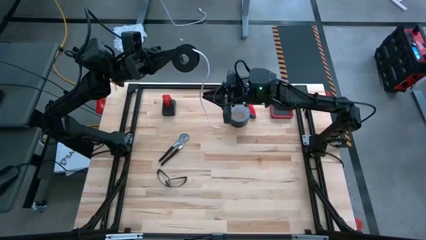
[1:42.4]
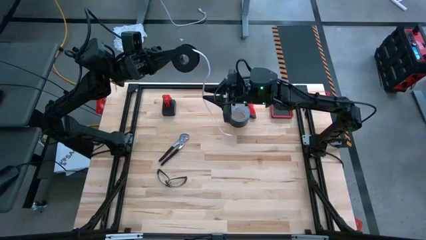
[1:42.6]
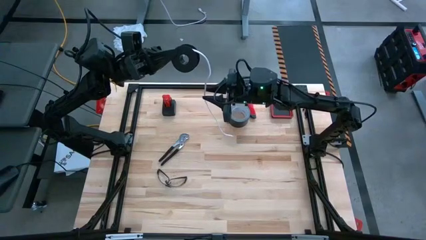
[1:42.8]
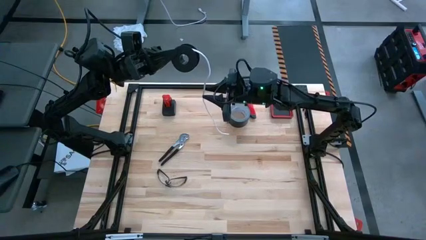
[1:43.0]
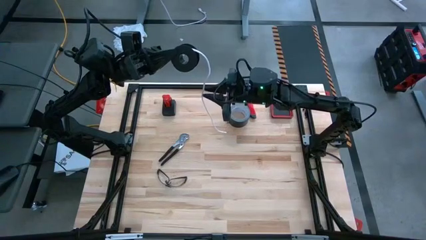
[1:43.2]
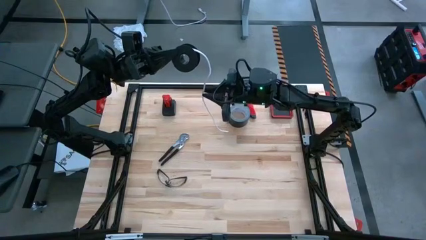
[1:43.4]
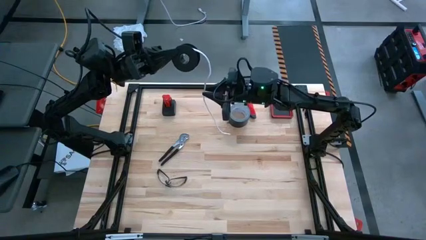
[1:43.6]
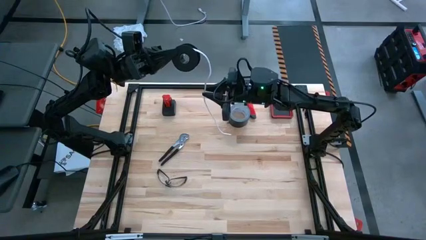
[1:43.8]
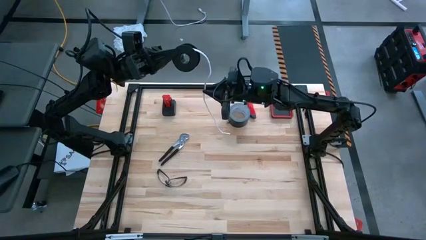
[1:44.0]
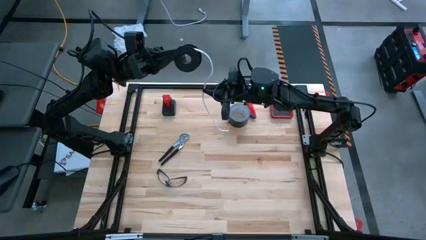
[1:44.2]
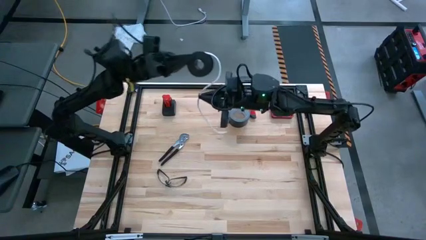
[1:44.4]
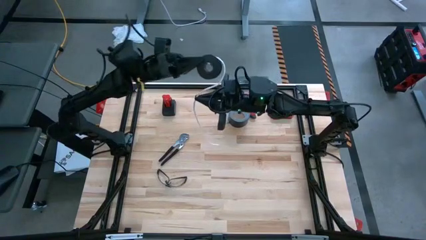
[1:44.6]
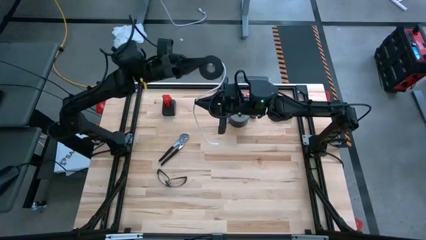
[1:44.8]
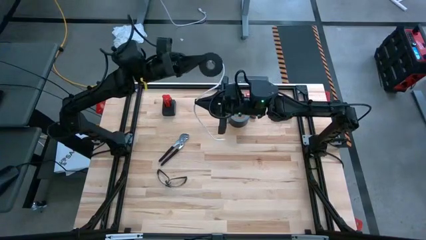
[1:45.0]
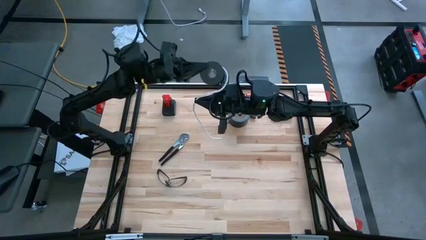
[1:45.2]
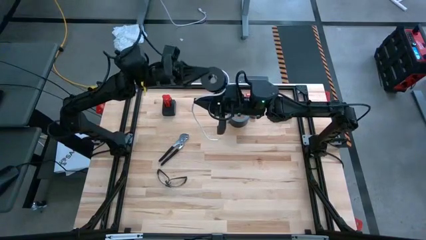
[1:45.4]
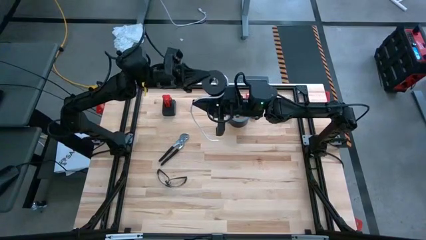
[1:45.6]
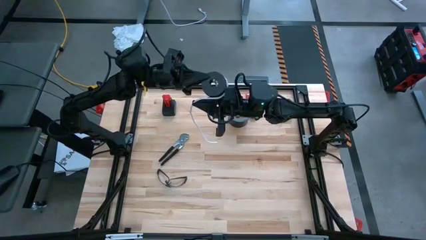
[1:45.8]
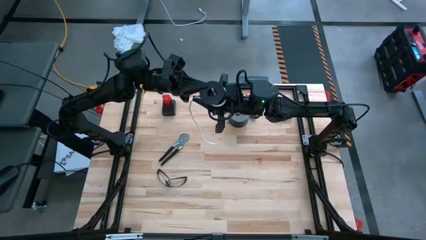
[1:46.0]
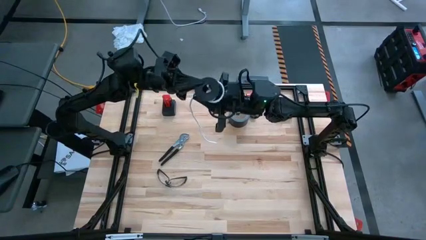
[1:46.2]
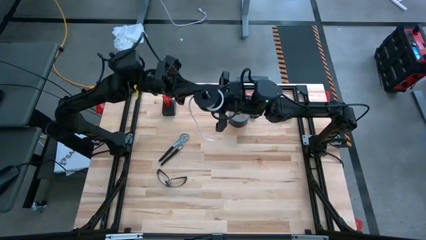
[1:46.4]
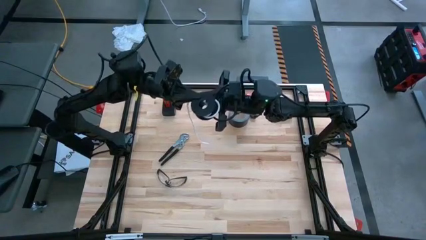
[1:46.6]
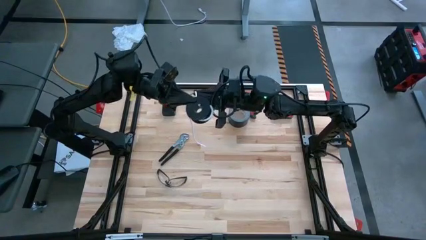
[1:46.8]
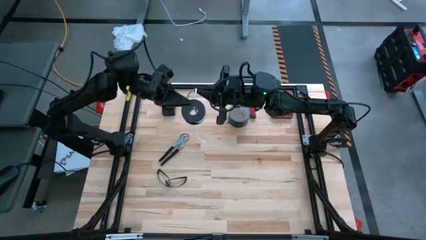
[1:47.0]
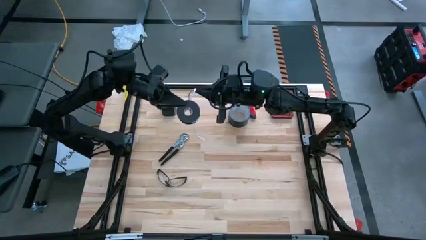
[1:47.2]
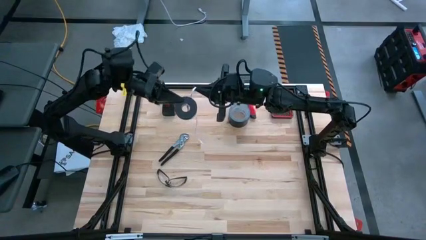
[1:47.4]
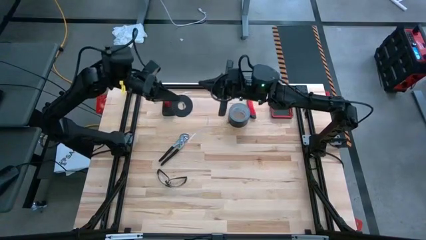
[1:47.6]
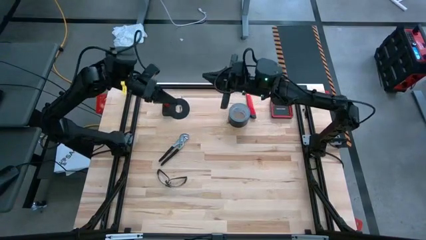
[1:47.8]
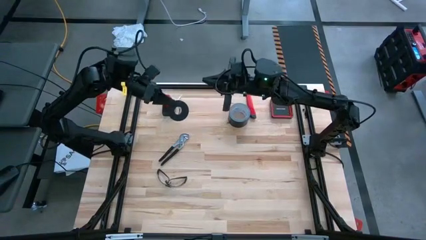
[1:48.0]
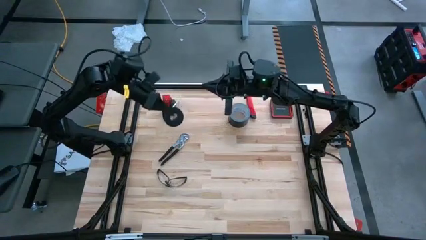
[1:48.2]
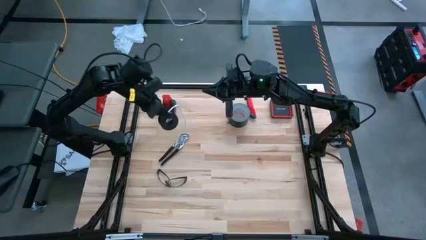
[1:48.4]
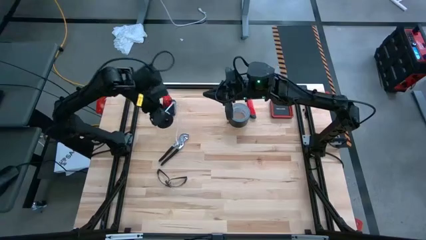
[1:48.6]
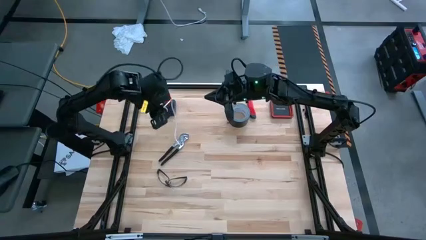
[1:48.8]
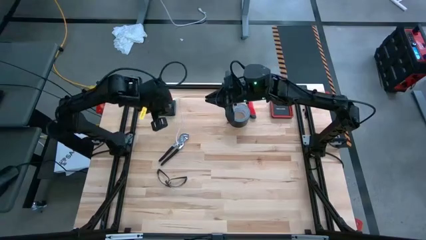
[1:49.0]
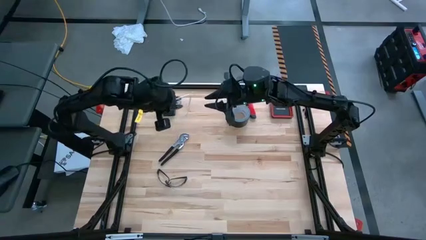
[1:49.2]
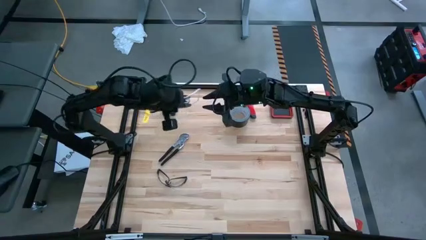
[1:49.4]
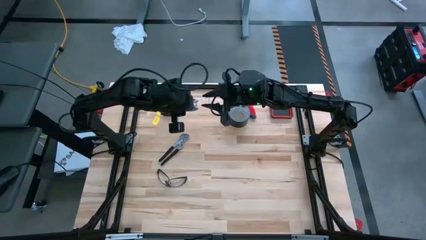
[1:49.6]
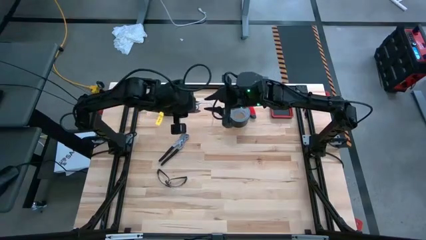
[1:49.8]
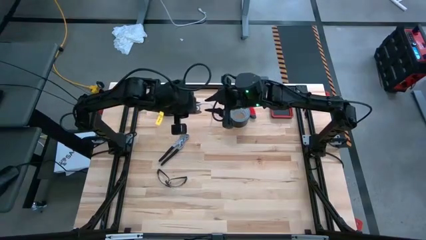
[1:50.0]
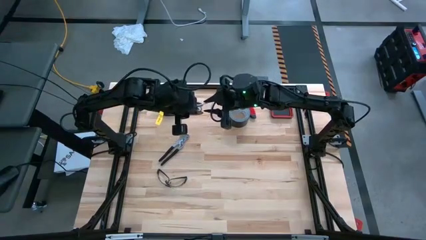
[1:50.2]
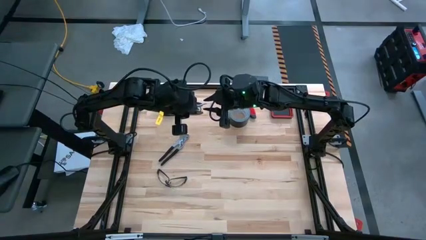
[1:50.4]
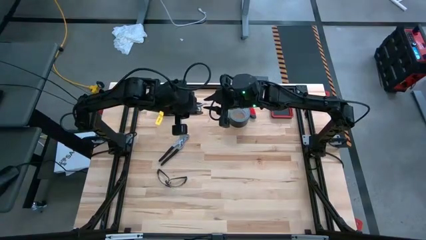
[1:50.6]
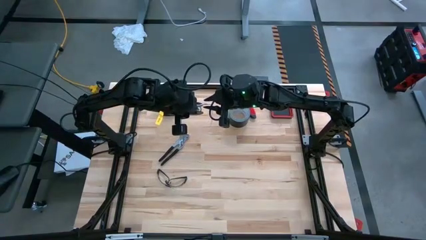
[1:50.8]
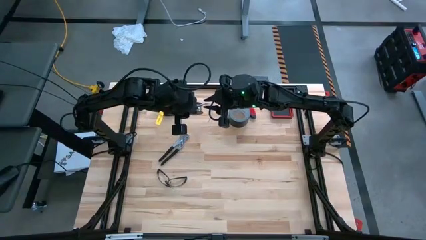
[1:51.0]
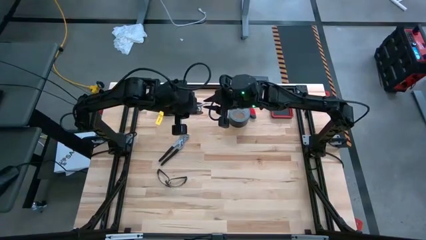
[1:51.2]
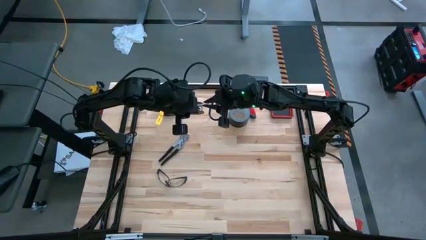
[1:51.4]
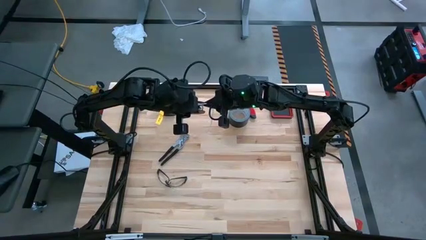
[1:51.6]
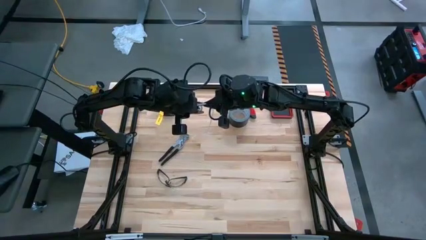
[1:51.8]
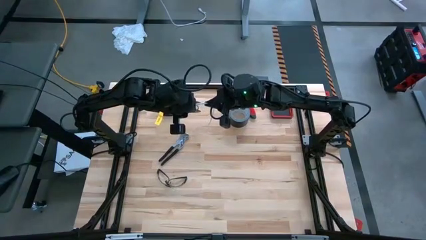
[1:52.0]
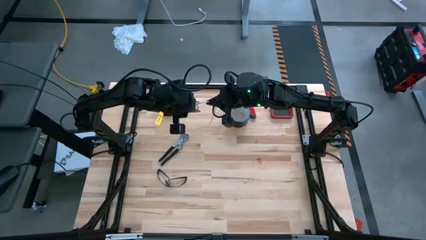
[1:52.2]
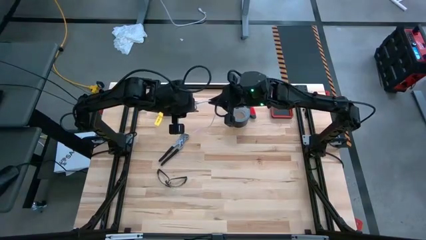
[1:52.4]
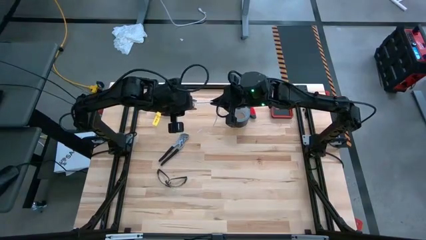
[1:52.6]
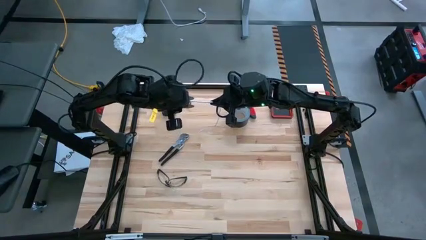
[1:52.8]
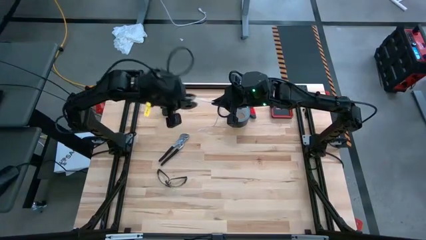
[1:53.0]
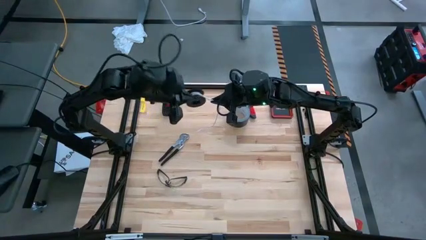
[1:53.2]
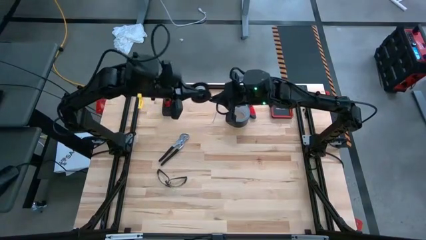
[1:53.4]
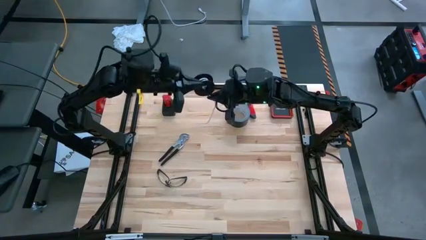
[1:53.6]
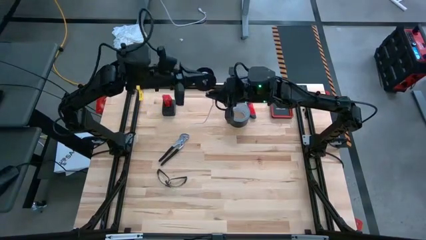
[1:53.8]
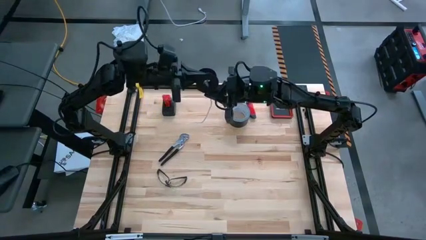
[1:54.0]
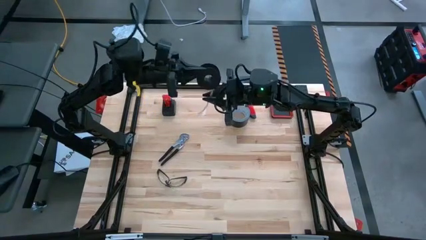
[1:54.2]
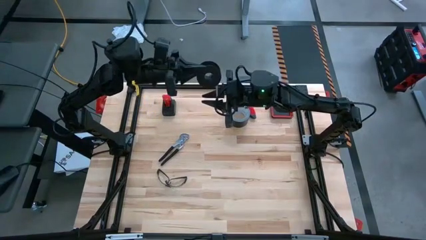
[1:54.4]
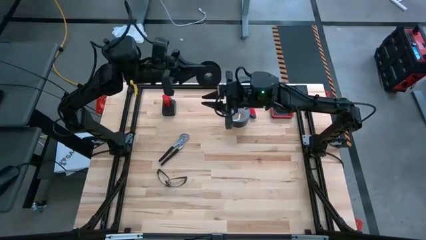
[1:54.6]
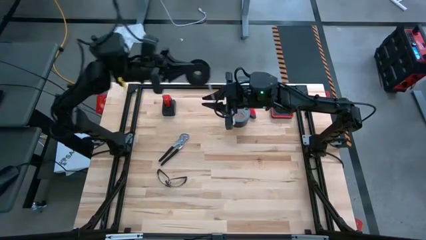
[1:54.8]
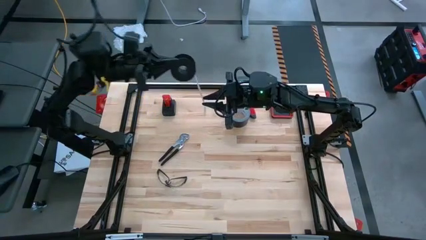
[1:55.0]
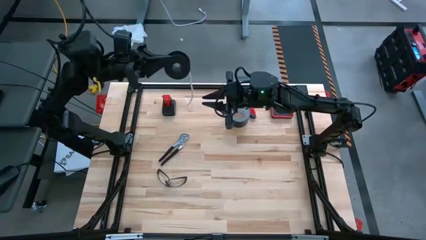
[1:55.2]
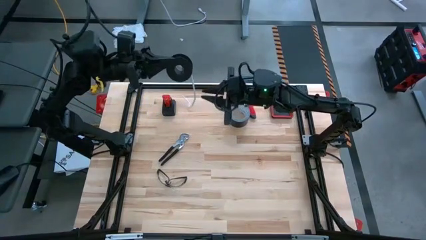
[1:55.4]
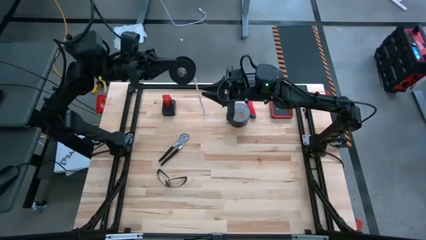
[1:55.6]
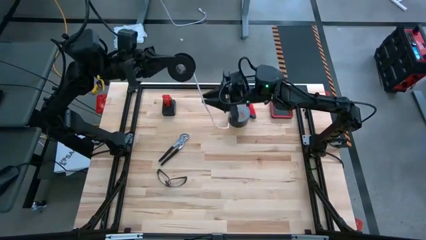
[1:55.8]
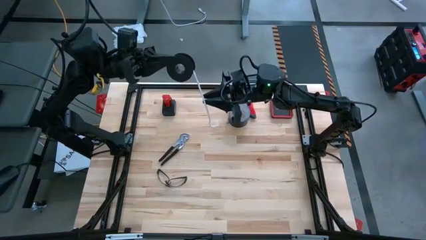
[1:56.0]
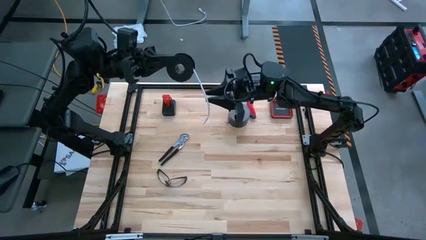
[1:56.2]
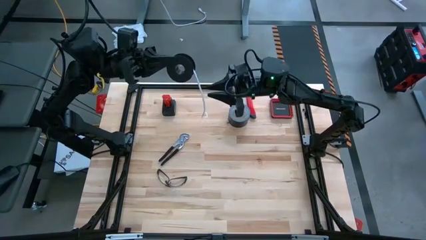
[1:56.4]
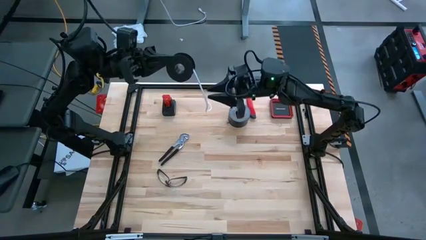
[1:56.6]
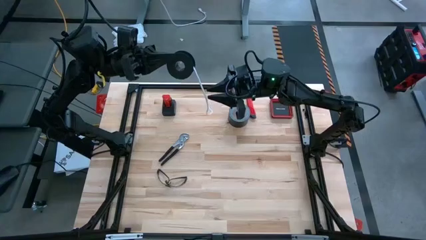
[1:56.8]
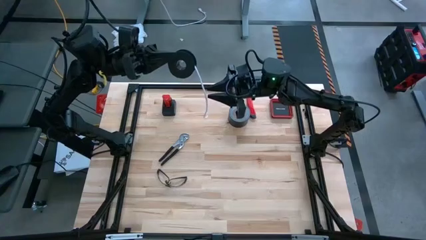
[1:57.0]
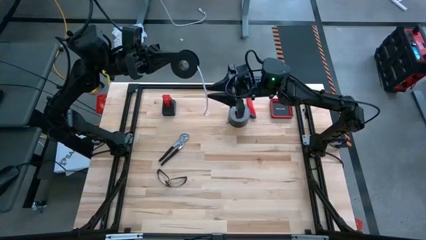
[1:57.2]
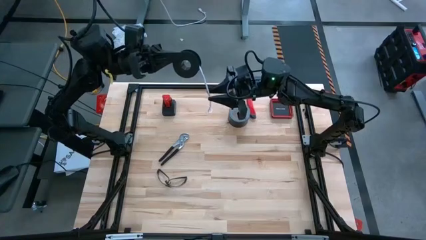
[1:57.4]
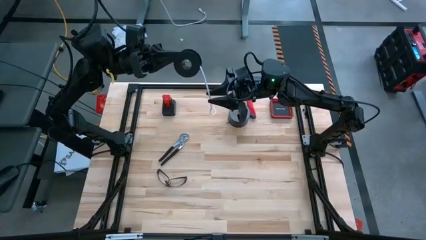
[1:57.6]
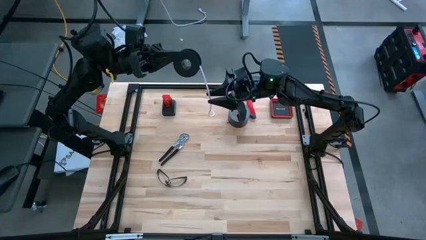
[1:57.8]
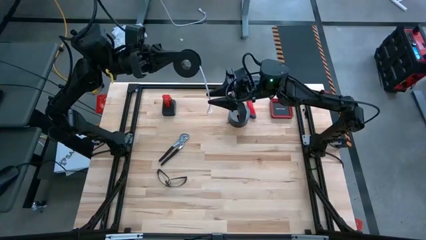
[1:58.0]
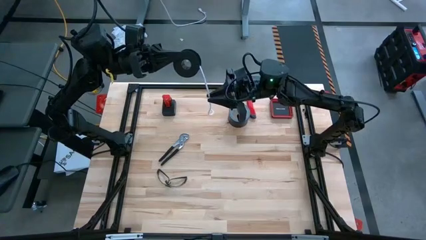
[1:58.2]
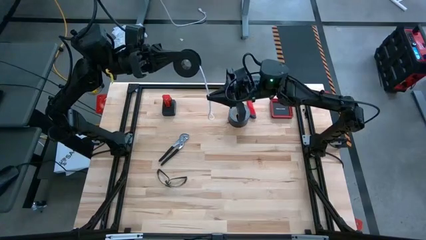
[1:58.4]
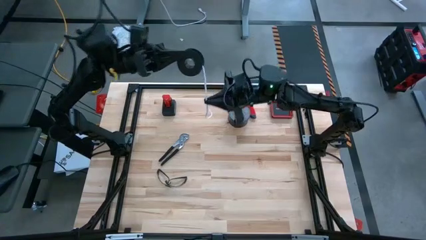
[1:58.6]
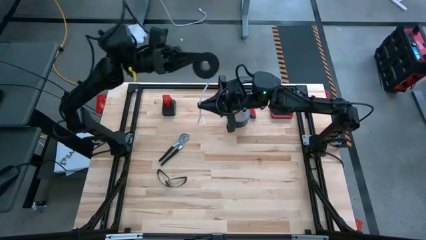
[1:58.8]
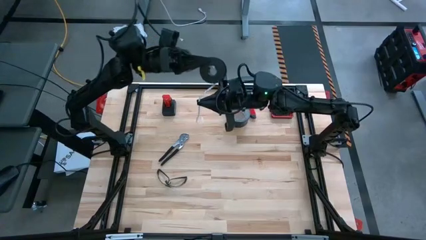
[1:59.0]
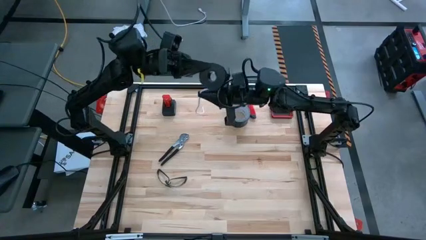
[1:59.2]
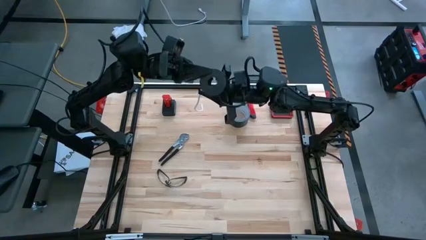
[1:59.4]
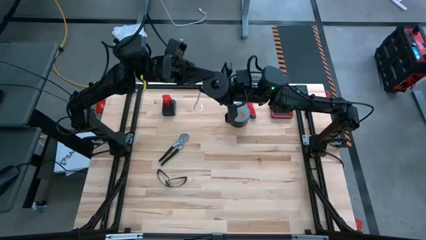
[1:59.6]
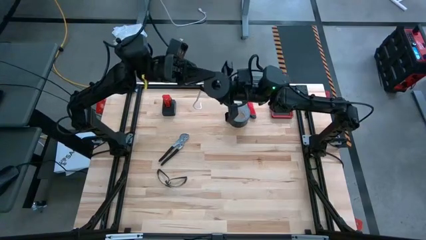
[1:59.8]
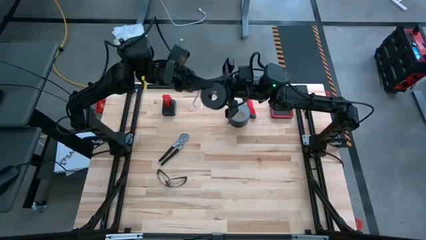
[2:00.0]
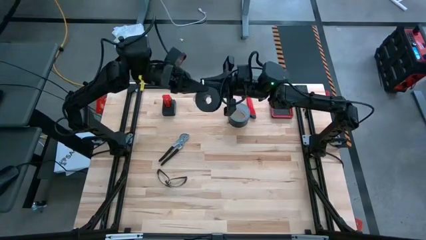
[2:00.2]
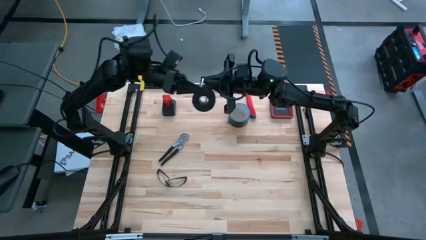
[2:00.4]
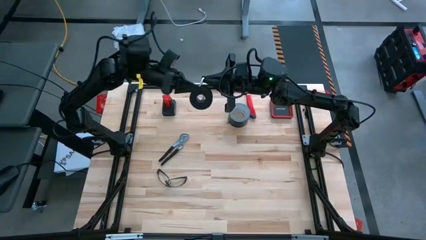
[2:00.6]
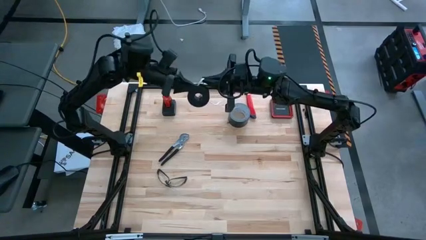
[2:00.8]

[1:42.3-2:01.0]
Task: Coil cords
Coil the white wire onto the black spool
